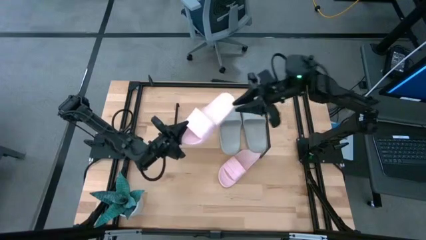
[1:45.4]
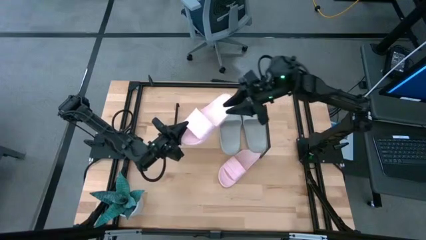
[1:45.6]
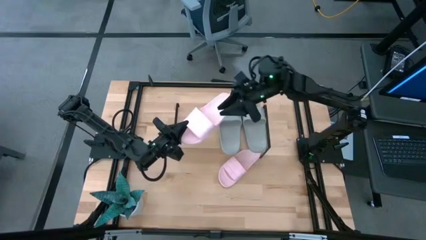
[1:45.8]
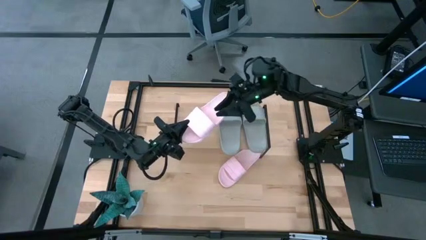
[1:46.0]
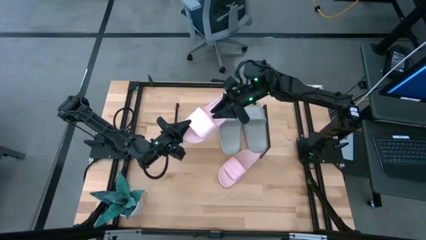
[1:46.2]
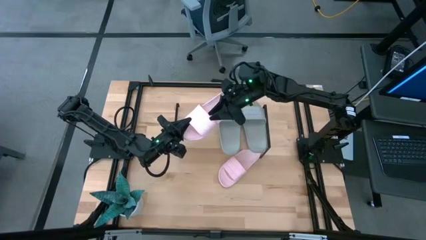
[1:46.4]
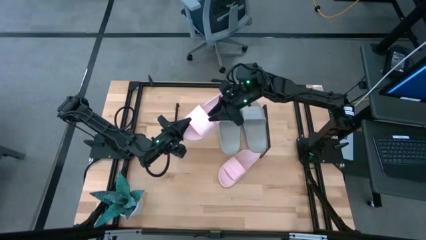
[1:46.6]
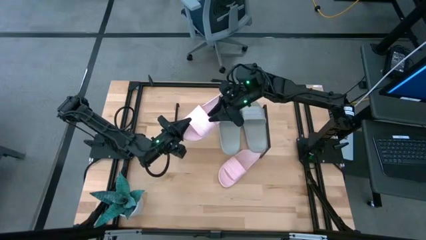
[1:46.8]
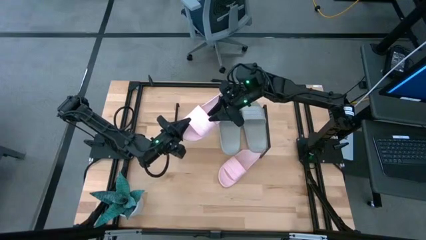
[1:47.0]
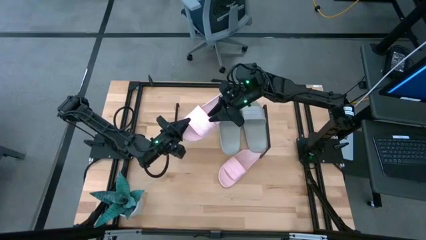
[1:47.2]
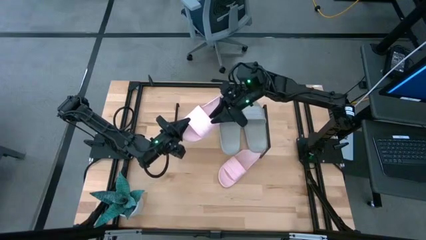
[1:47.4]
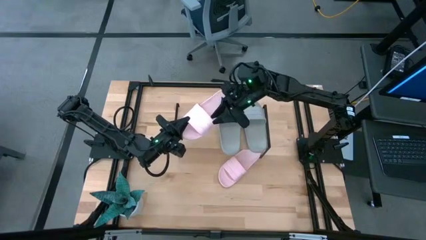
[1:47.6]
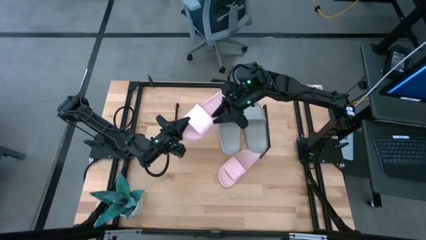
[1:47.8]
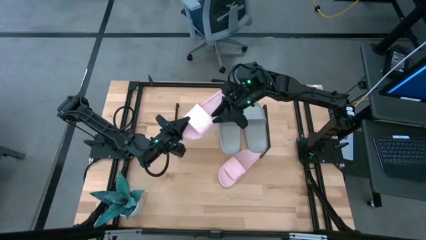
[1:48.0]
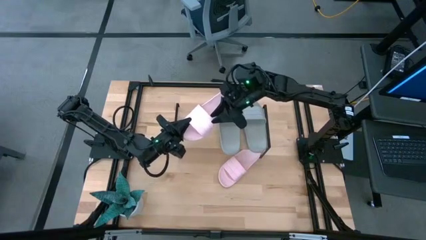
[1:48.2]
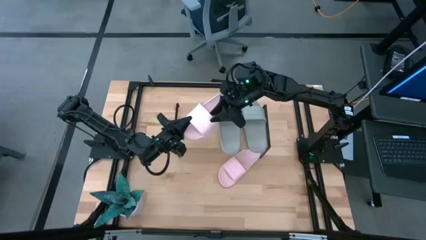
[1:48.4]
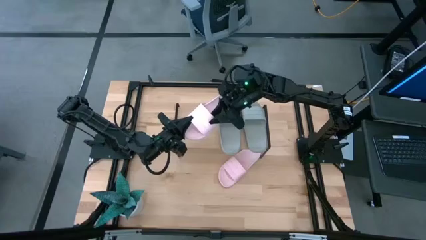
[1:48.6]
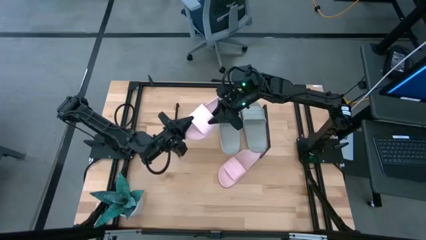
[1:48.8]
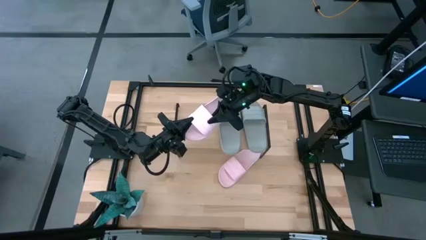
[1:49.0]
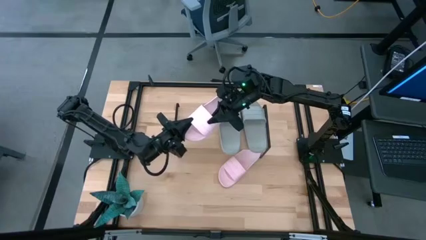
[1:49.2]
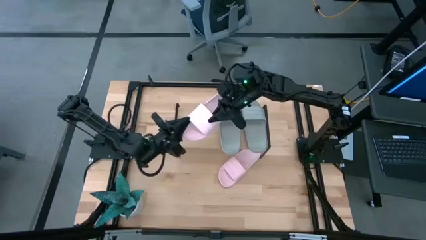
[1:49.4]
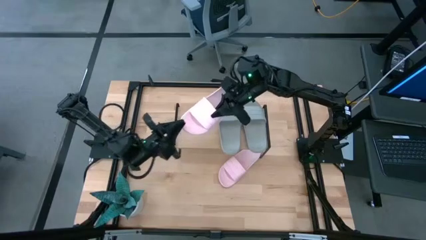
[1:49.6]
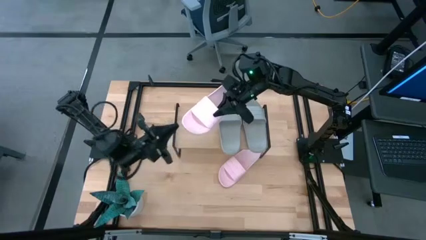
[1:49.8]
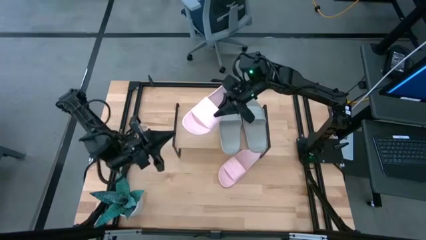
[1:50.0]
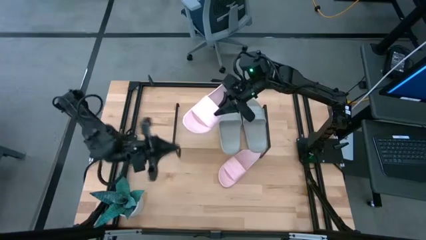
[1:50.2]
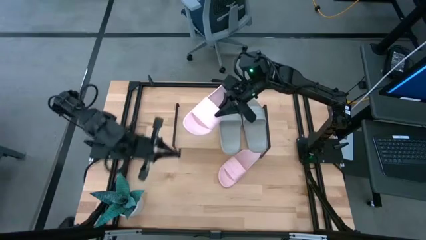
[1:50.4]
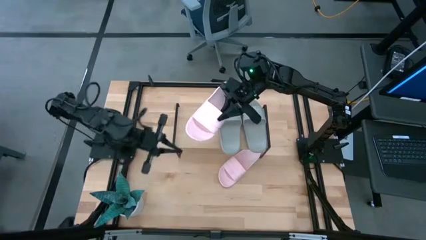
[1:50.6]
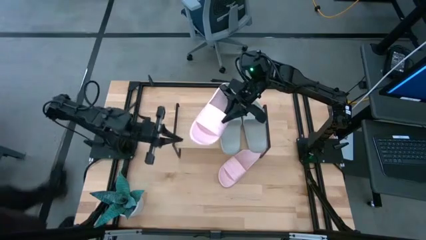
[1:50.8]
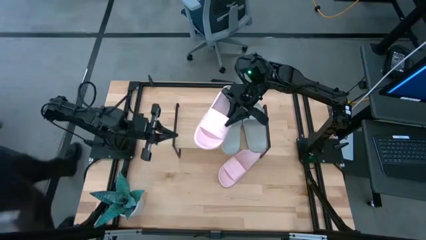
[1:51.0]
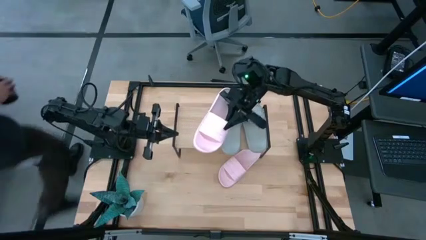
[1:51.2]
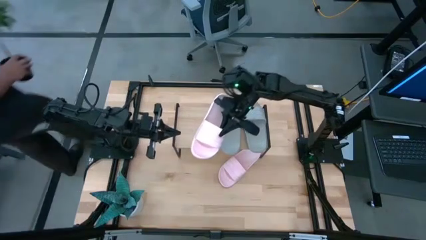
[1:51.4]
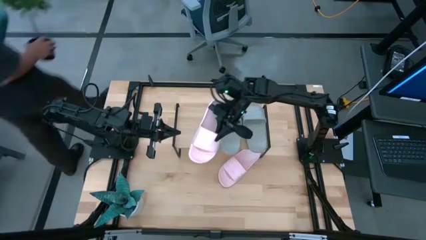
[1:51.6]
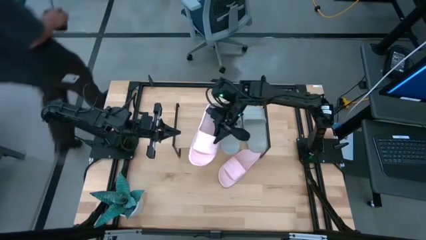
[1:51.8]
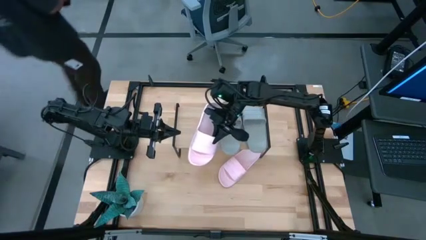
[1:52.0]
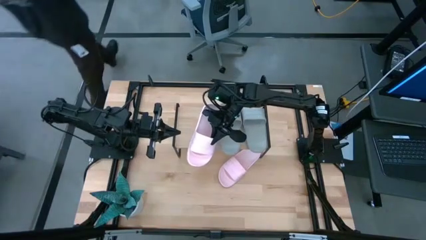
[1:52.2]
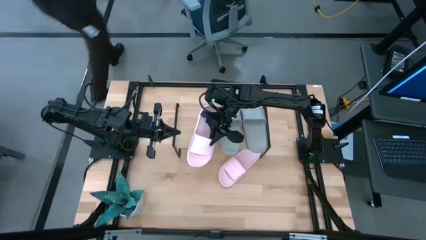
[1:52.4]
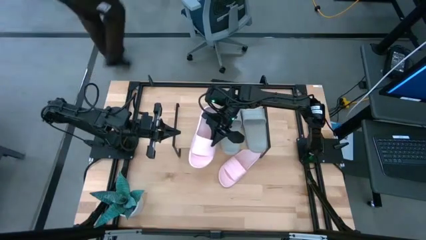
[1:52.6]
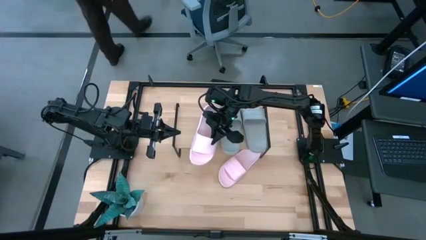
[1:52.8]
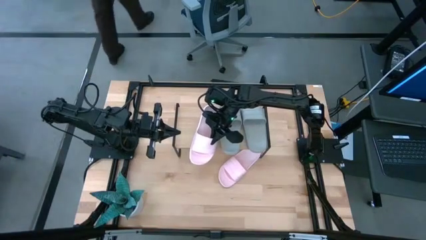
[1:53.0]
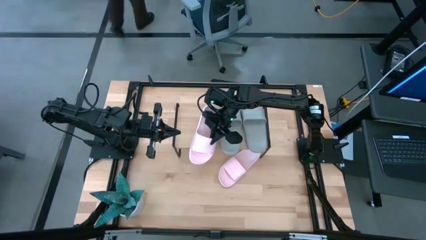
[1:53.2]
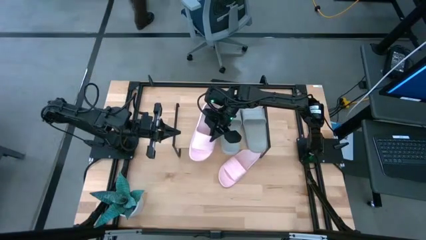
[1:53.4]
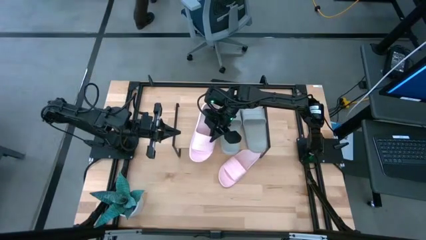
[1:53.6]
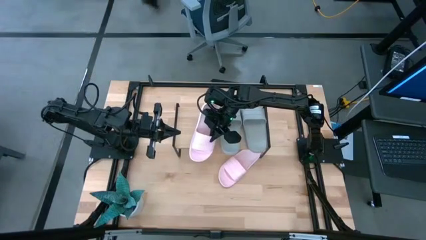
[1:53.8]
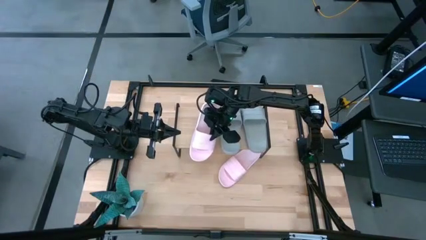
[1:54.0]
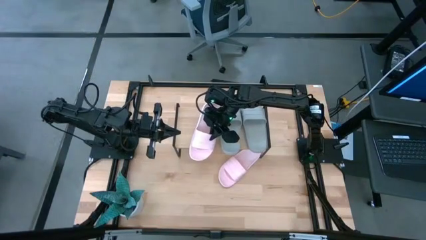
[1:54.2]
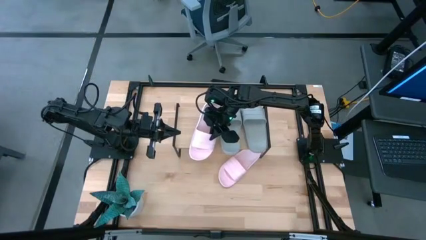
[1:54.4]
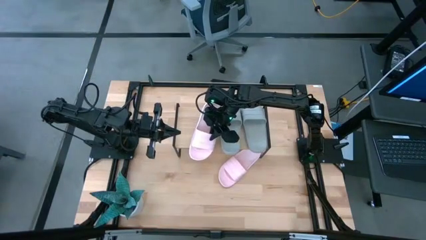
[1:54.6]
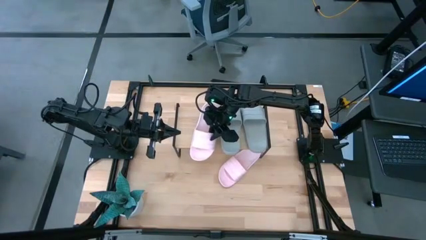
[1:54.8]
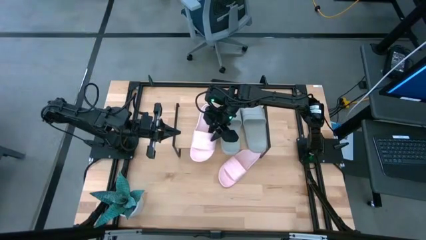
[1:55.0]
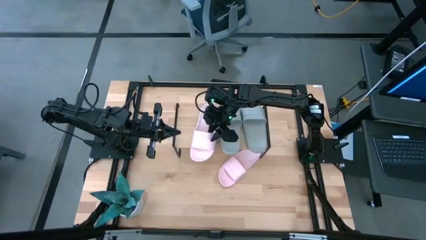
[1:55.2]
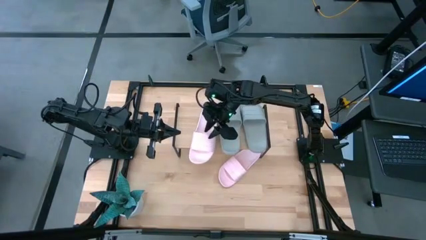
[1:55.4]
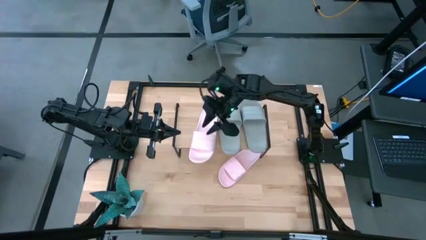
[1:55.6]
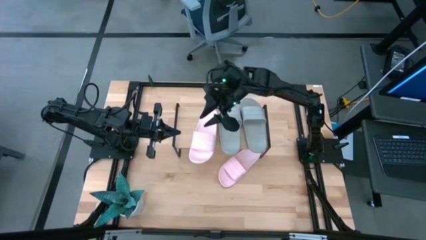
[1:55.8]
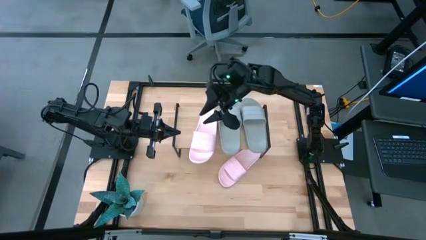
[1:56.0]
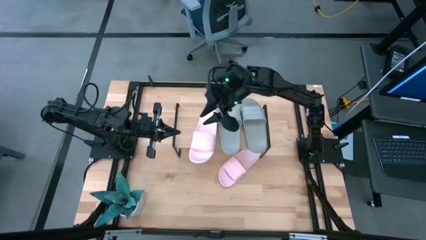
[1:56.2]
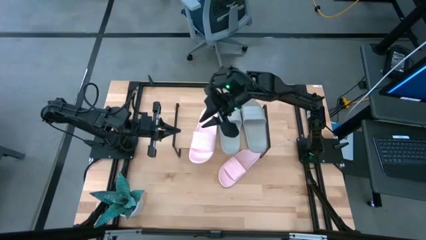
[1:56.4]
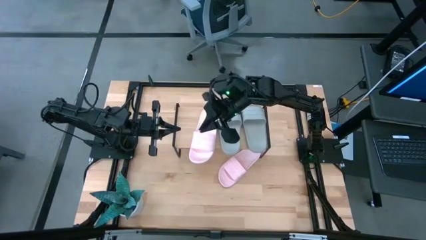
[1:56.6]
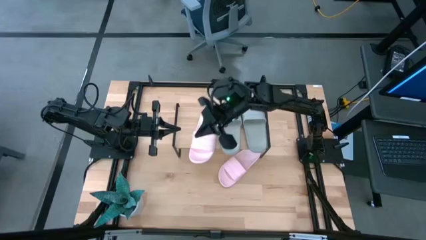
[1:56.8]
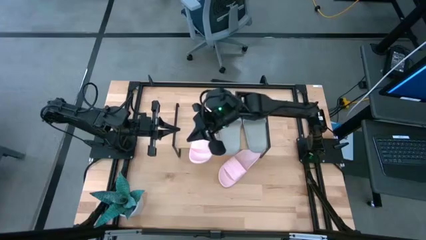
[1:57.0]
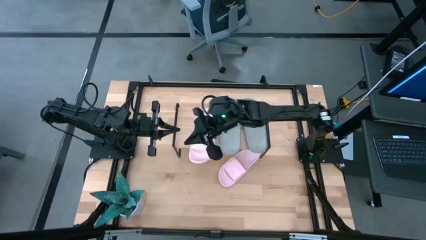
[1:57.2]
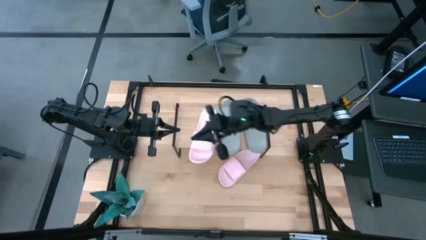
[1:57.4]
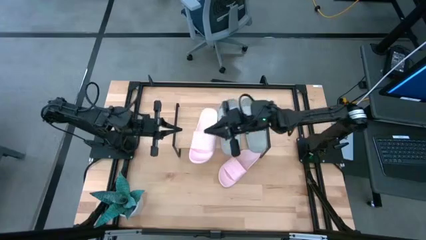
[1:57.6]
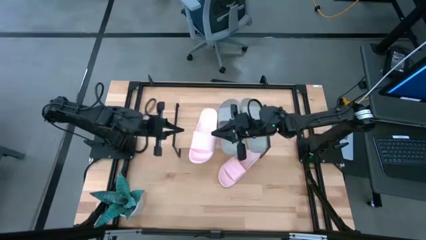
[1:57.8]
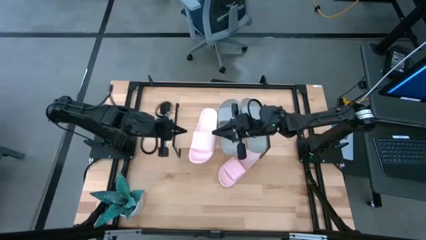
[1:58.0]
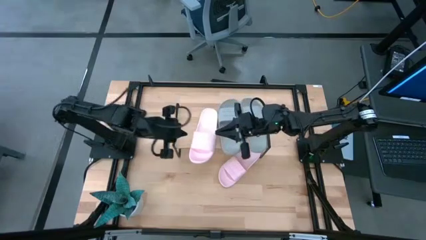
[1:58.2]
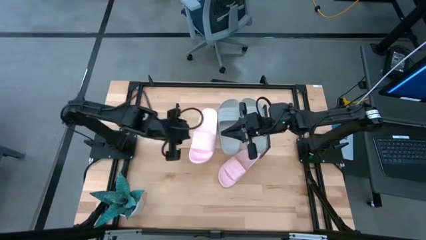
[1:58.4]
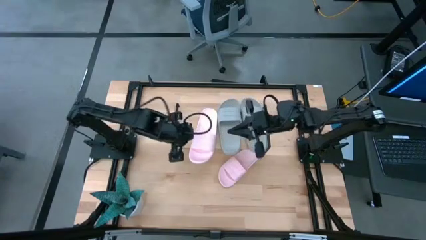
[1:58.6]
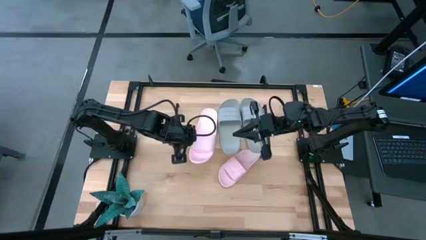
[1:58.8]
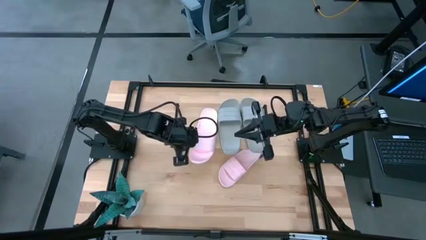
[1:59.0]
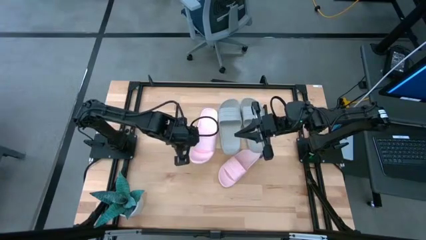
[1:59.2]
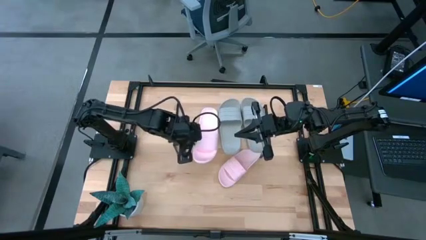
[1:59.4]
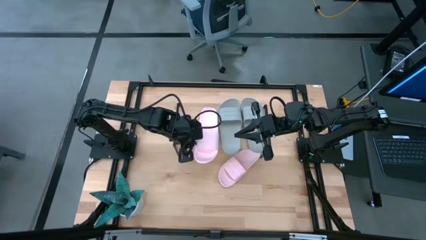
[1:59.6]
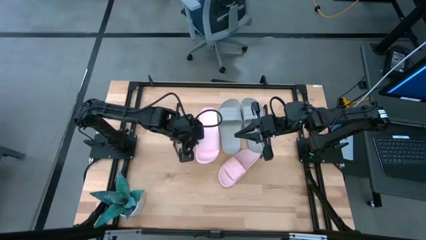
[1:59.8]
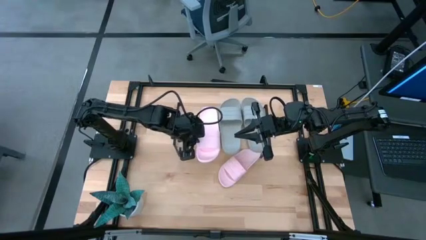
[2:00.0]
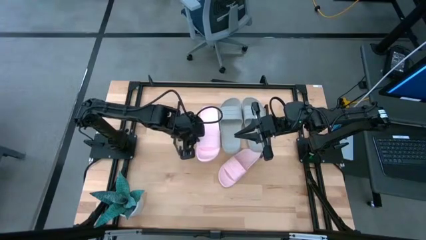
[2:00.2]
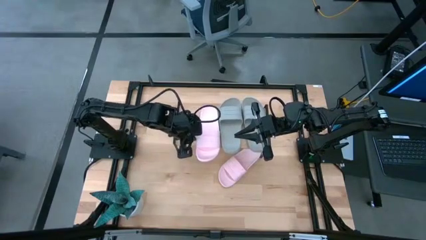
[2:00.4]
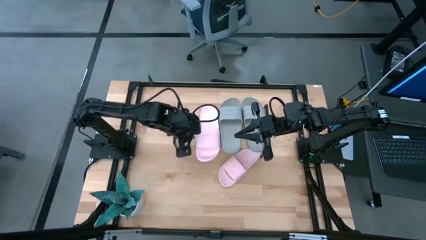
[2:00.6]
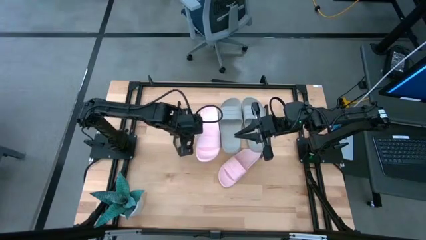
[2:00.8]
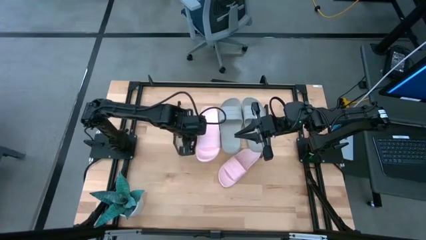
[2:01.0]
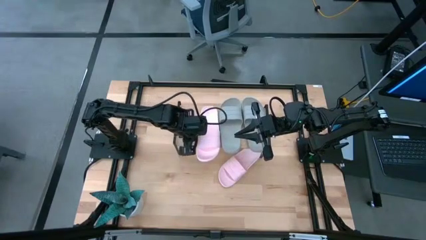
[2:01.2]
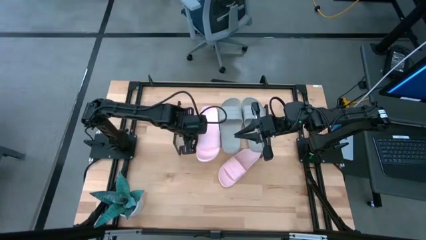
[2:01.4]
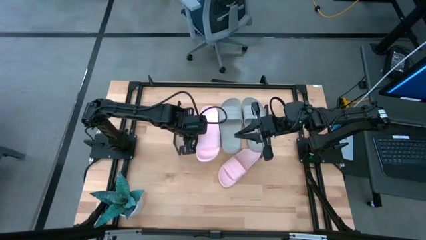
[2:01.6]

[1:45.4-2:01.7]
Task: Pick and place slides into the shelf
Put the left pink slide on the shelf
